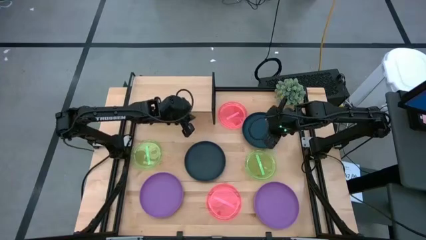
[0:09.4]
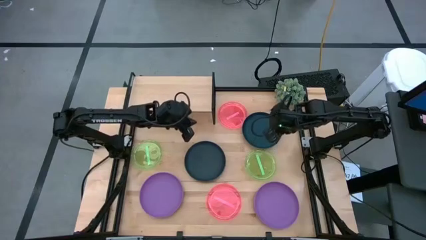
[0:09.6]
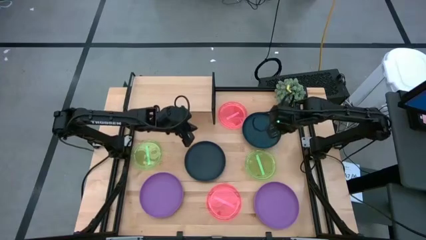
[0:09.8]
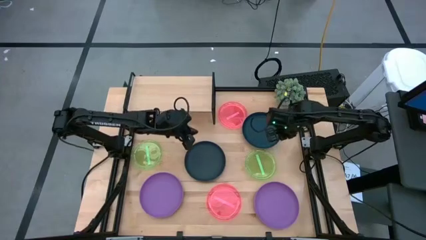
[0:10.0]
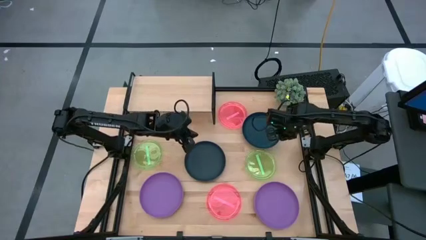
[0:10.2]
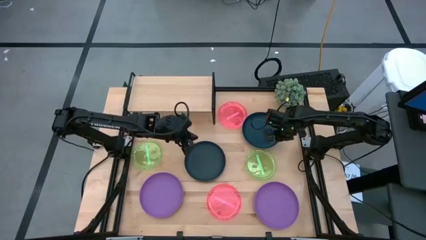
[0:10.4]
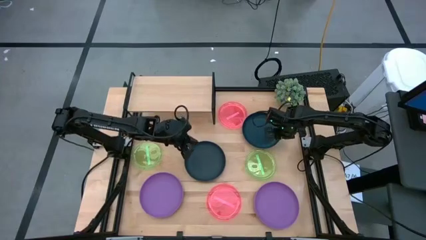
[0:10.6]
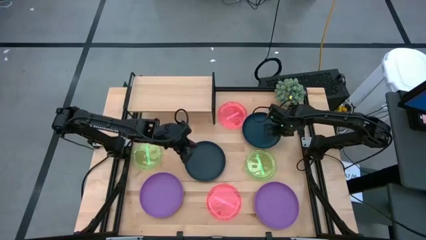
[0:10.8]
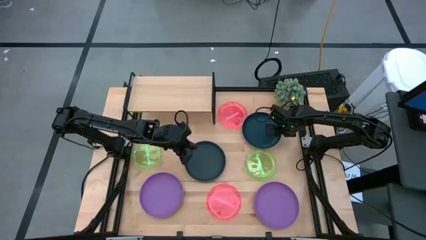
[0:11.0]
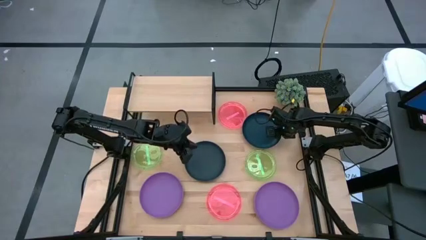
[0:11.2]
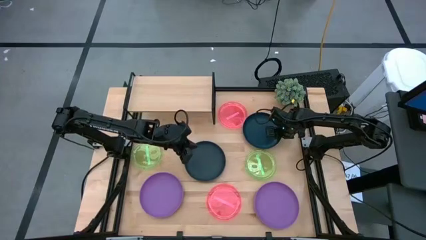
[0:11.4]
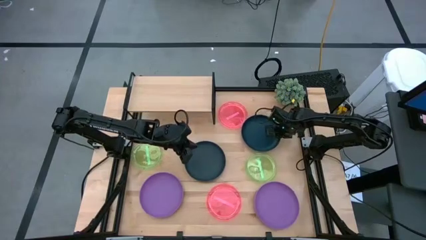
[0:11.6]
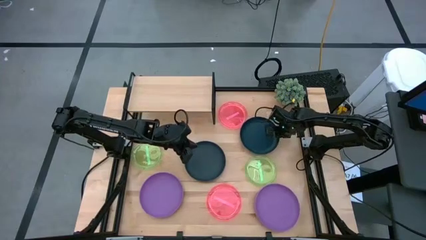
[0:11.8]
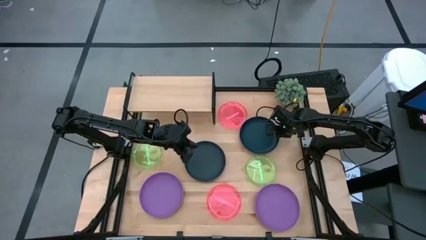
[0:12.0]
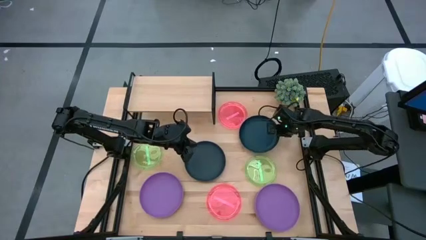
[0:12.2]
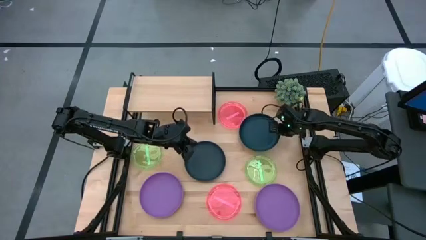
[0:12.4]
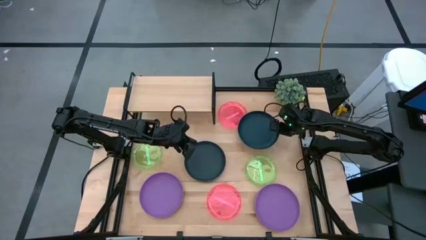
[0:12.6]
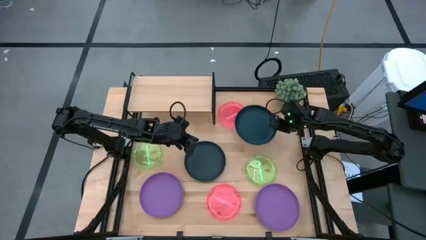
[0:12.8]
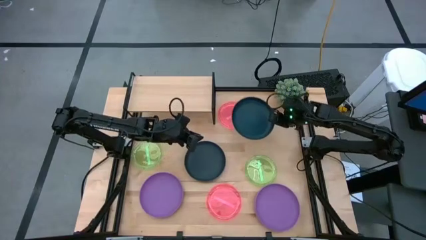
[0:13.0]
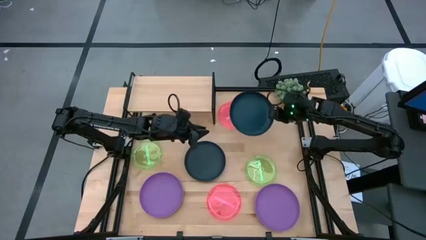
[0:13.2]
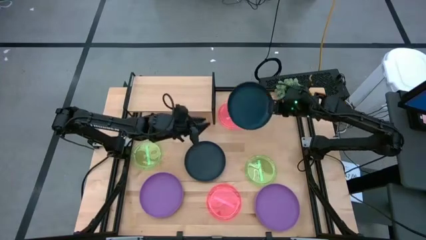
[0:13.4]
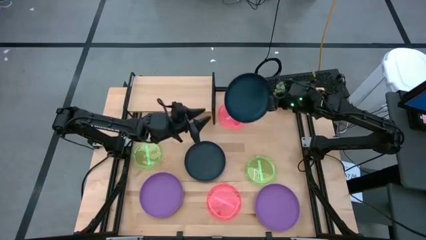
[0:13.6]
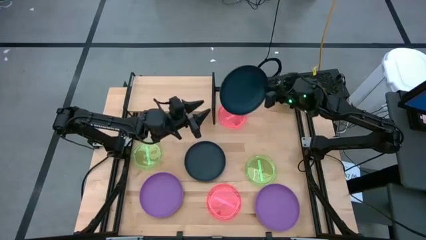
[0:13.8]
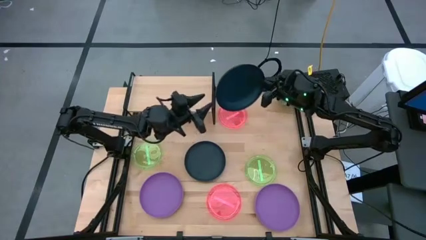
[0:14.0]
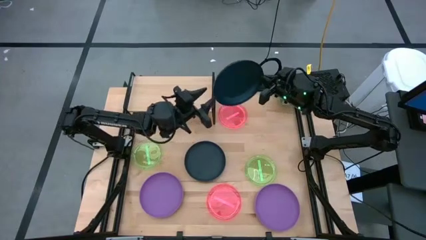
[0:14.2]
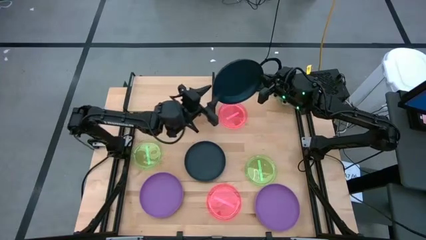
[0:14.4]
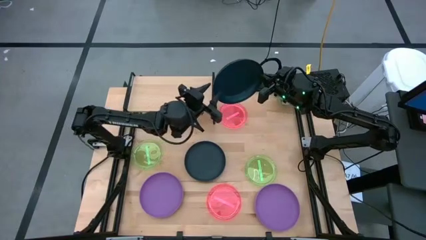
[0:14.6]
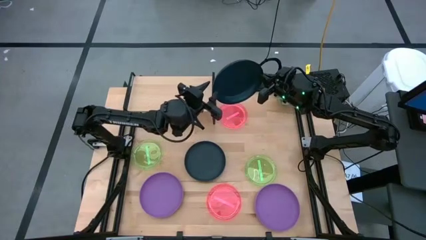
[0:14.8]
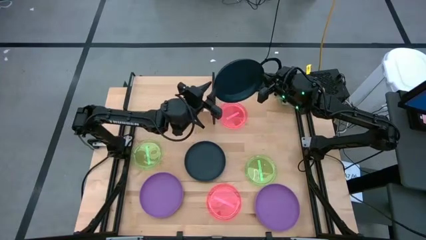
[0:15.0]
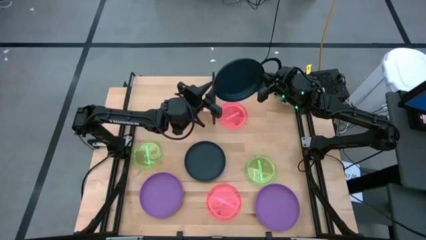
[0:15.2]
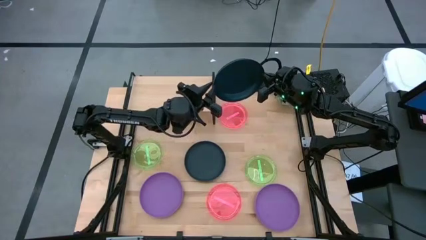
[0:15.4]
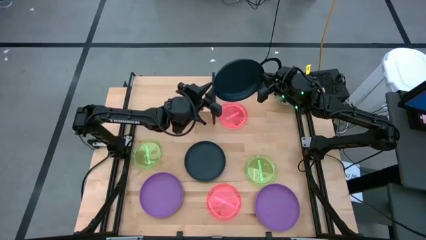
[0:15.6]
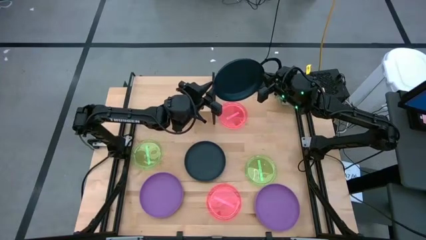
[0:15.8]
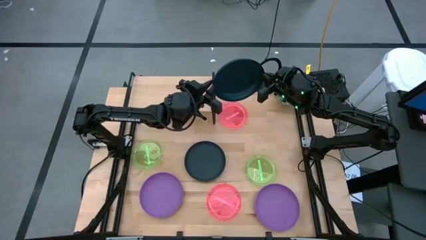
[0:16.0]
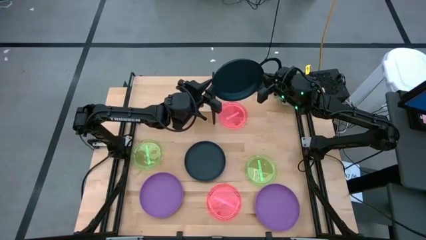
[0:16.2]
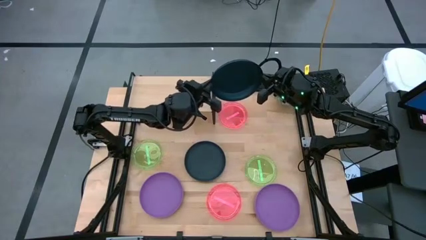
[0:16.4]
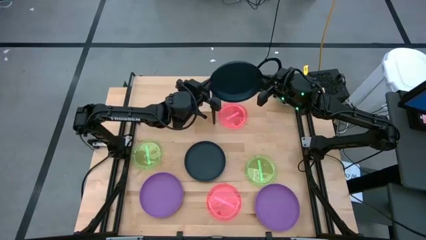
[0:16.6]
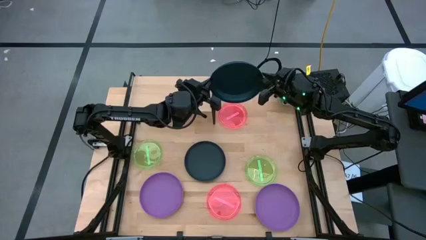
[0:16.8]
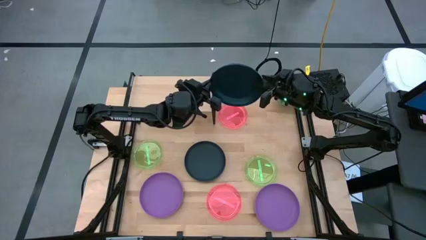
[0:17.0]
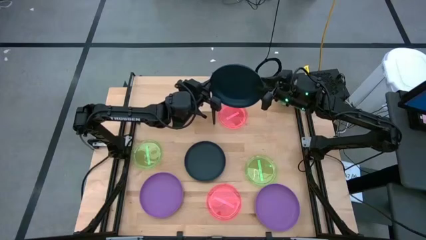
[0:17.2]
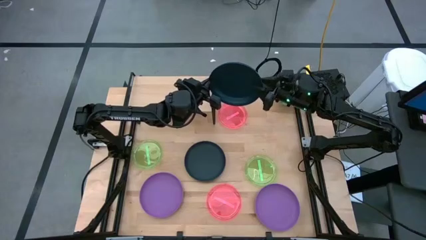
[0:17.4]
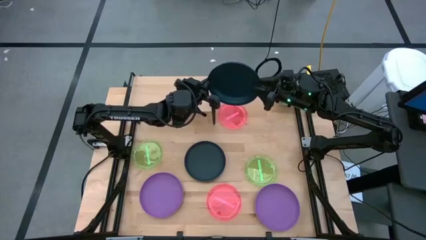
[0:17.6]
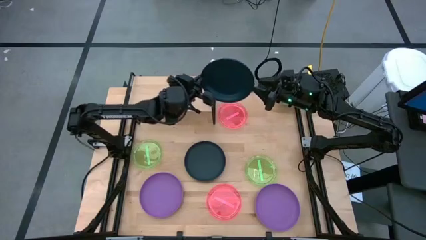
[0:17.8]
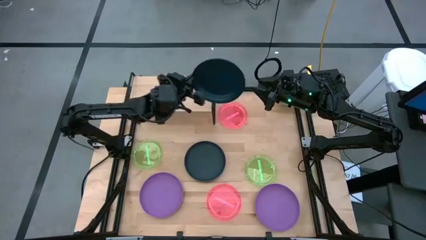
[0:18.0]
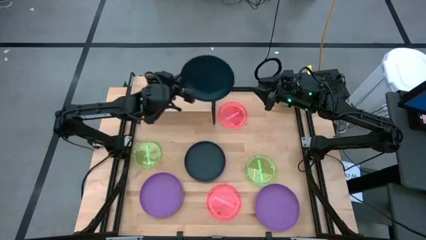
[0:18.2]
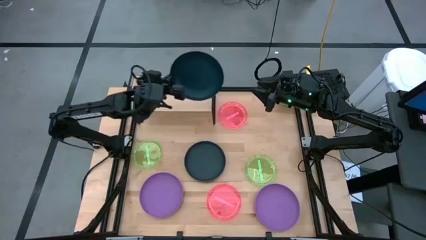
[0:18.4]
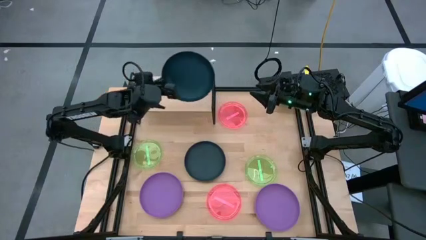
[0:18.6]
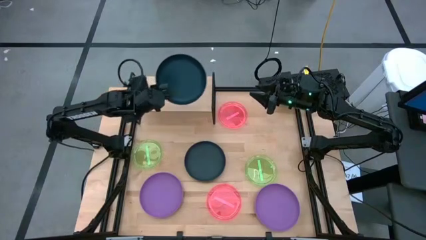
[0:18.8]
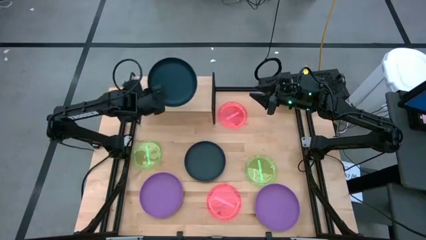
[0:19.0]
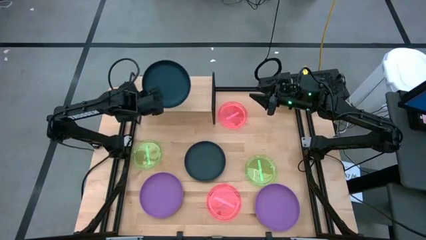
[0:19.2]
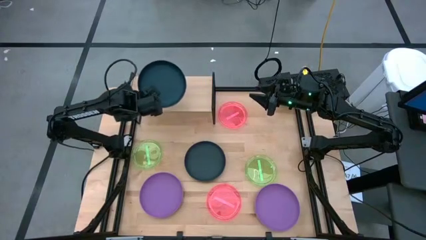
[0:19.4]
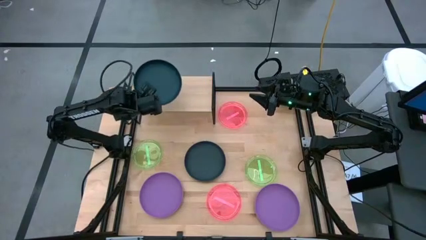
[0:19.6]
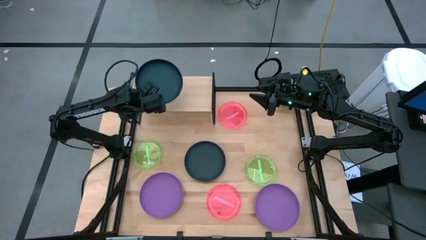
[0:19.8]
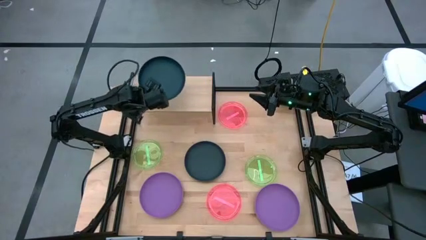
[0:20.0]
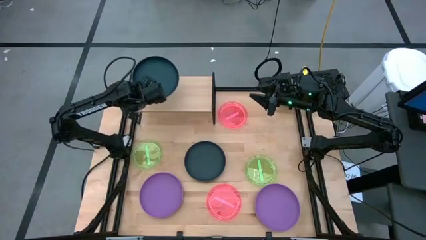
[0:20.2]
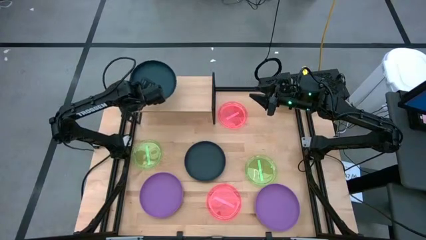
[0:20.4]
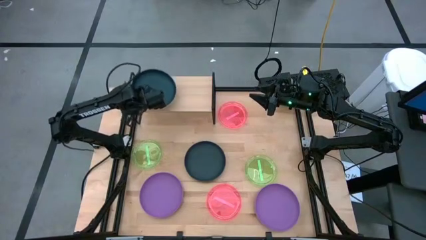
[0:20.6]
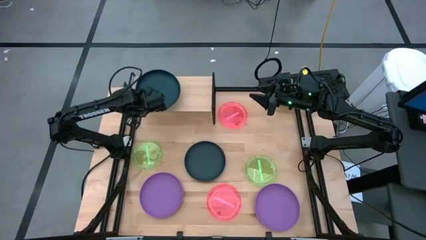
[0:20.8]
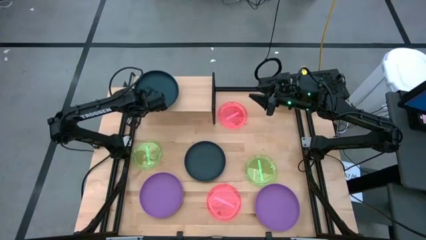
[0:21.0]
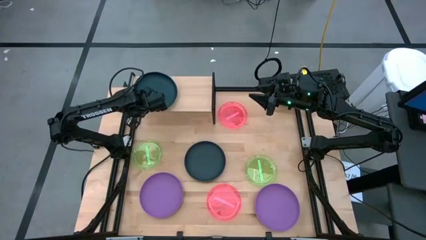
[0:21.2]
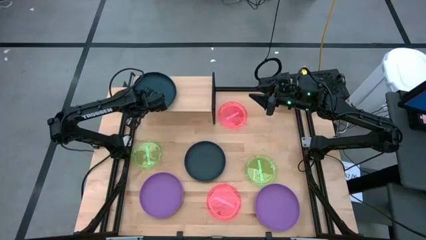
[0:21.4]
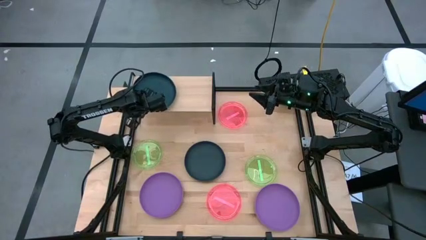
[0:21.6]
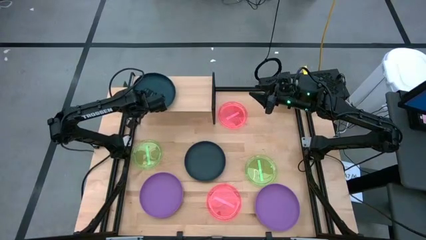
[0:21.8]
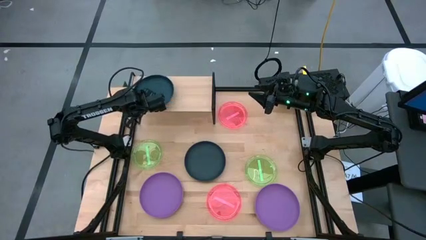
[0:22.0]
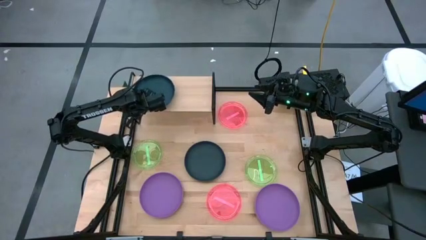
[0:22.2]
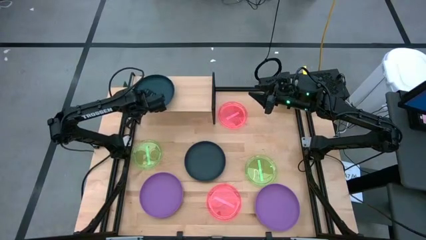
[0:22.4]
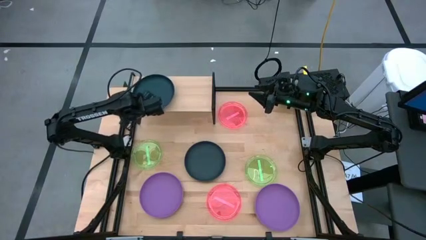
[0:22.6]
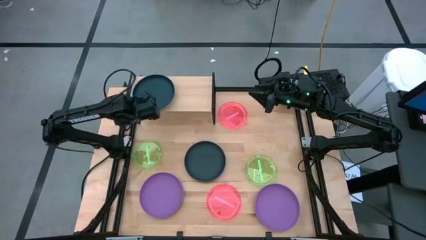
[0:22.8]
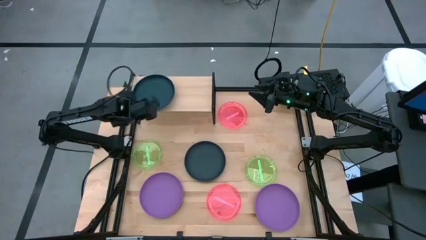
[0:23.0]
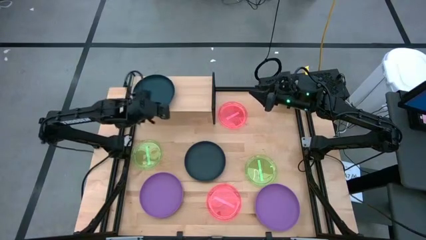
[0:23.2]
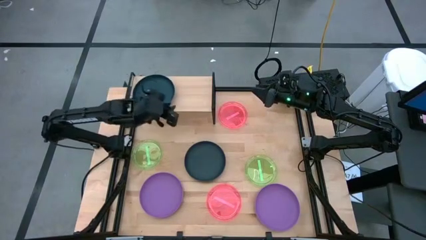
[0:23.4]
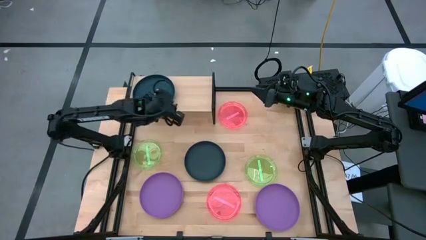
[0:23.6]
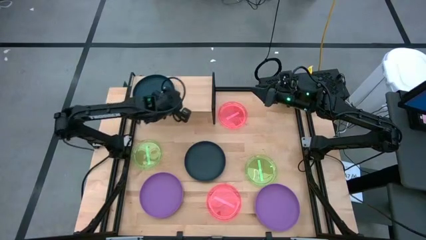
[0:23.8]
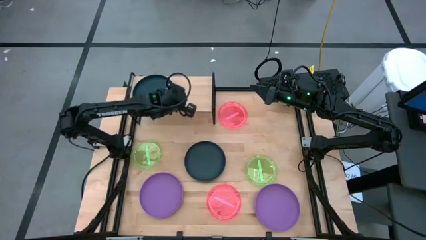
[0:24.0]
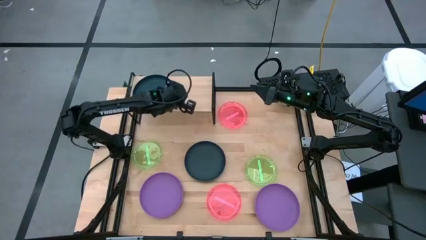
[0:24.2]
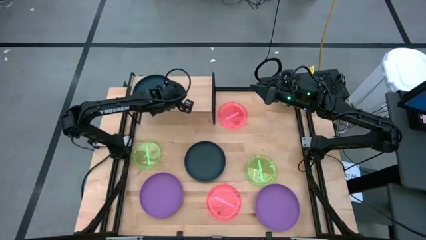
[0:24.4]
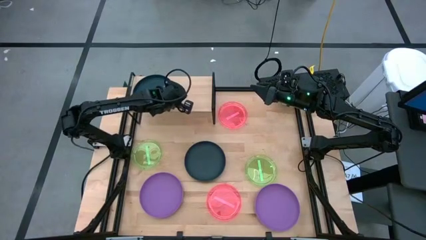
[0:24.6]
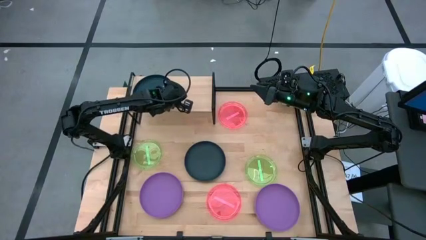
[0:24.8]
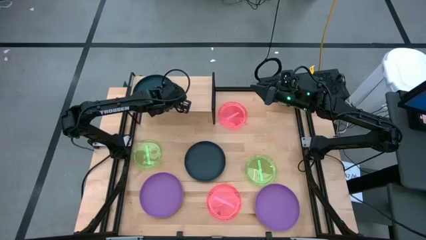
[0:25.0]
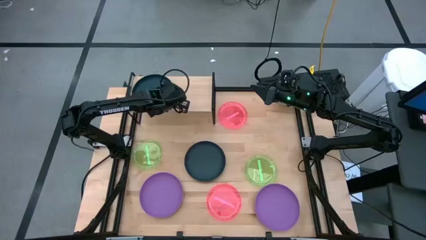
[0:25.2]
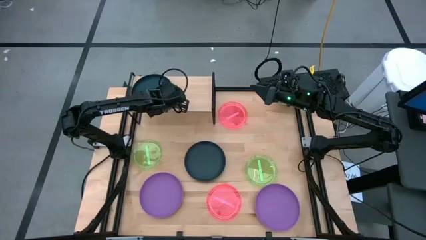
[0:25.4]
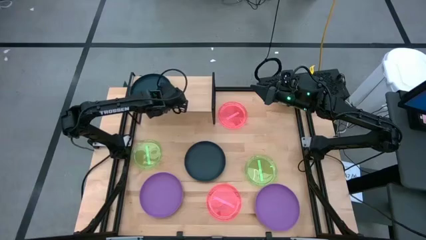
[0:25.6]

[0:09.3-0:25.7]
Task: Place and stack plates onto a shelf
Put the dark blue plate on the shelf
